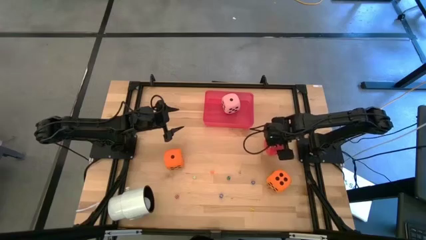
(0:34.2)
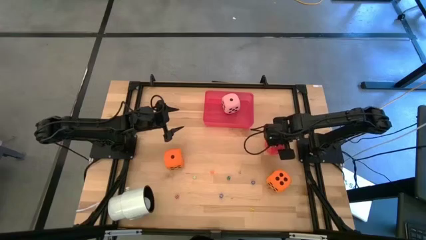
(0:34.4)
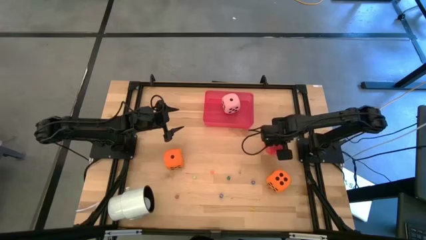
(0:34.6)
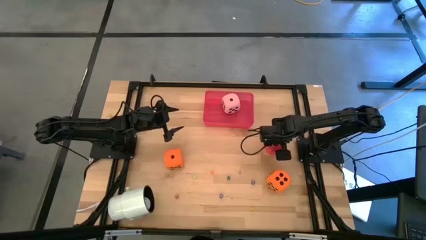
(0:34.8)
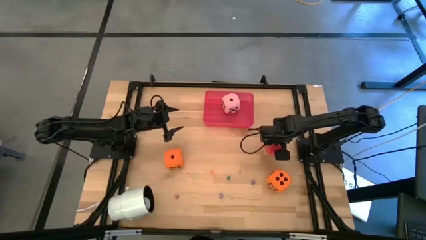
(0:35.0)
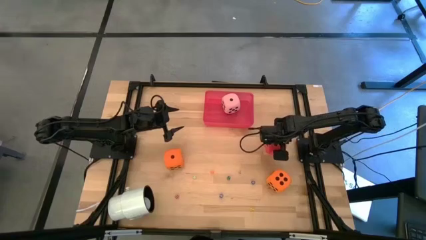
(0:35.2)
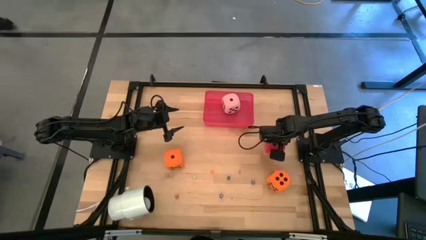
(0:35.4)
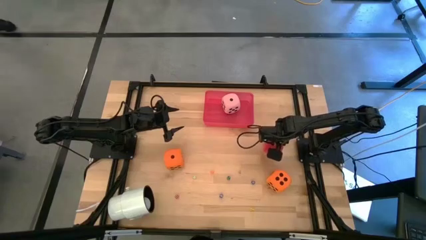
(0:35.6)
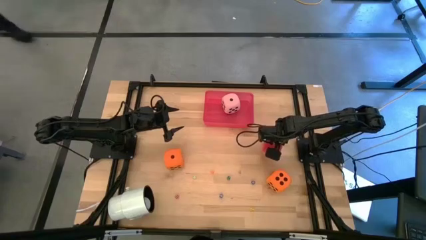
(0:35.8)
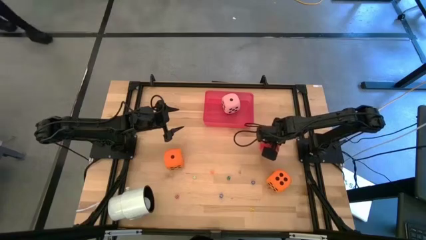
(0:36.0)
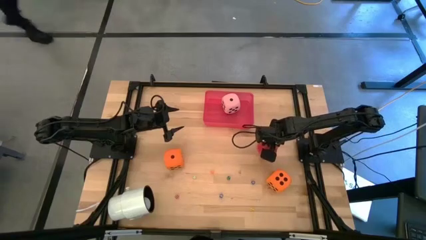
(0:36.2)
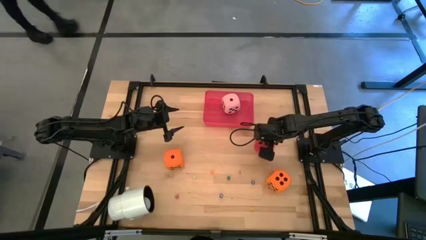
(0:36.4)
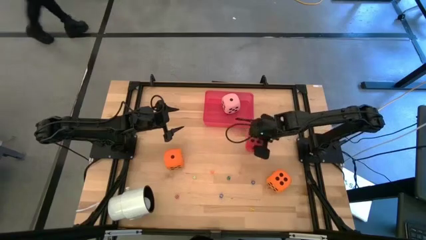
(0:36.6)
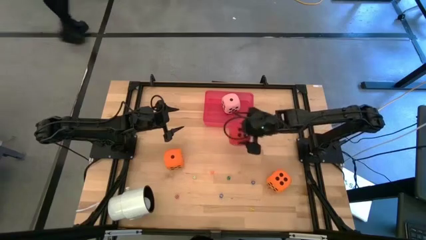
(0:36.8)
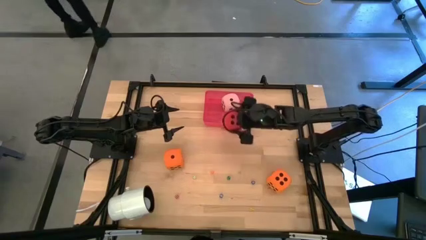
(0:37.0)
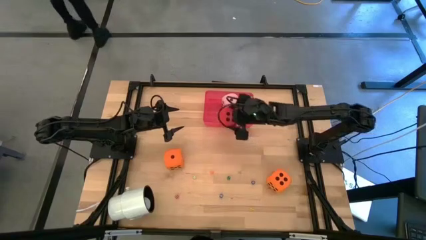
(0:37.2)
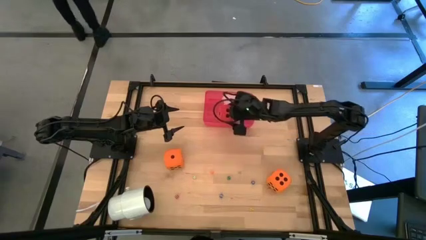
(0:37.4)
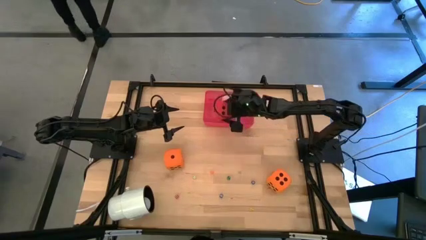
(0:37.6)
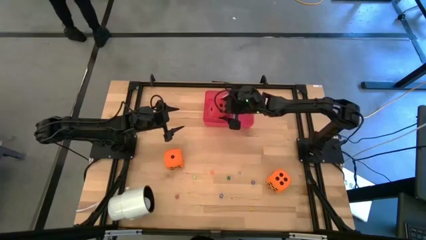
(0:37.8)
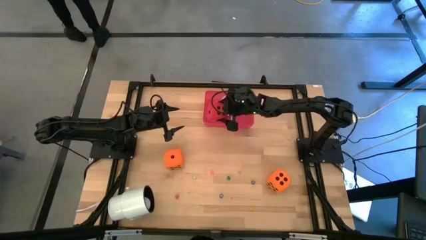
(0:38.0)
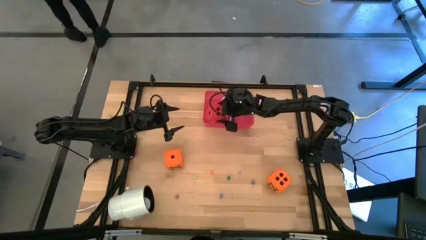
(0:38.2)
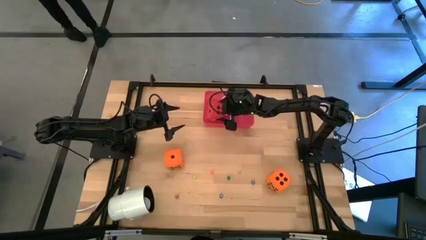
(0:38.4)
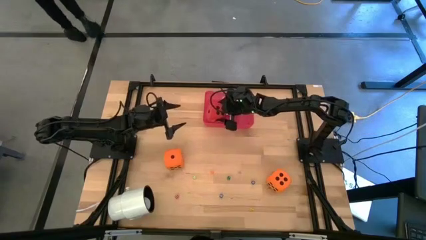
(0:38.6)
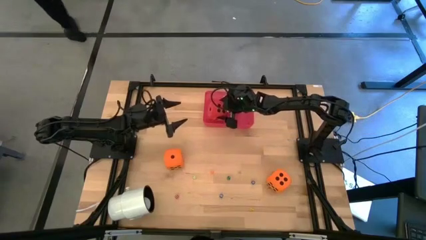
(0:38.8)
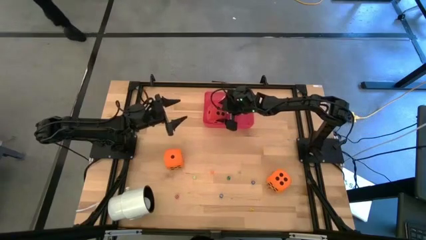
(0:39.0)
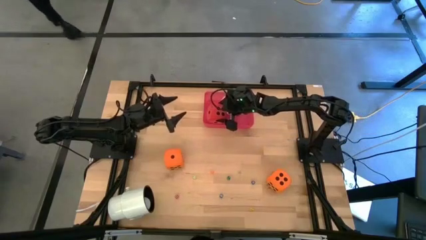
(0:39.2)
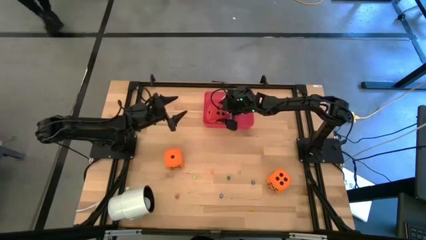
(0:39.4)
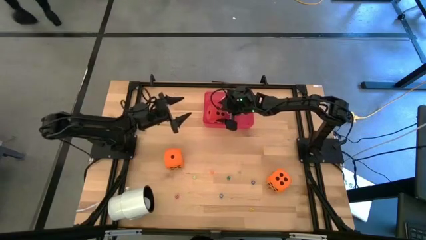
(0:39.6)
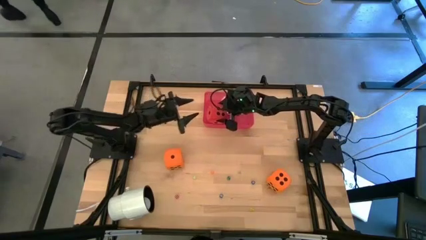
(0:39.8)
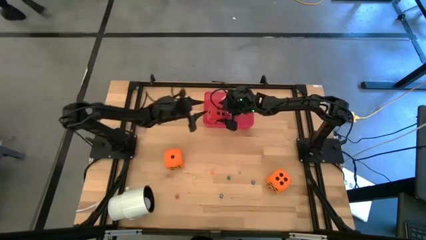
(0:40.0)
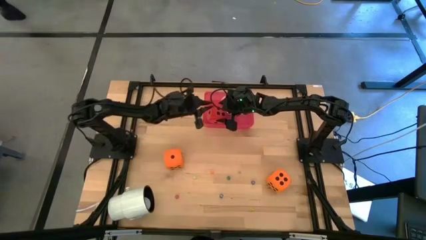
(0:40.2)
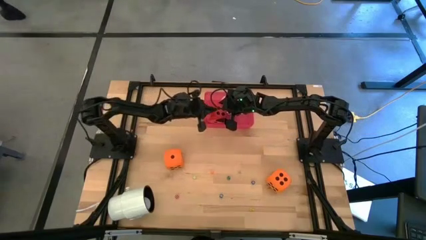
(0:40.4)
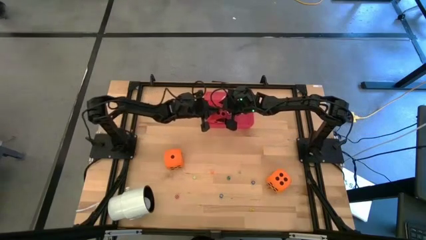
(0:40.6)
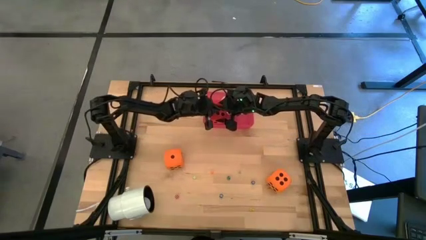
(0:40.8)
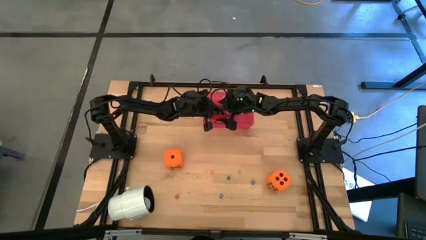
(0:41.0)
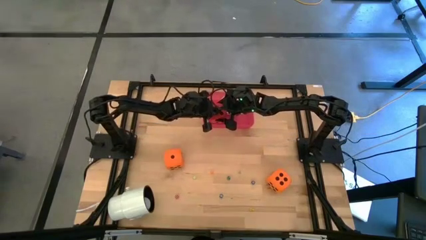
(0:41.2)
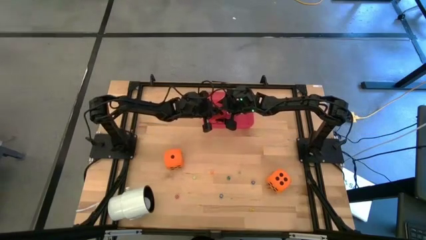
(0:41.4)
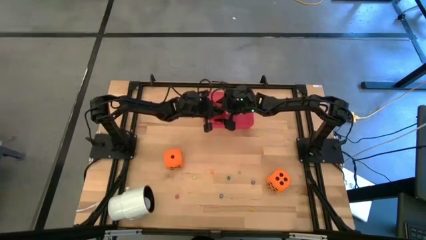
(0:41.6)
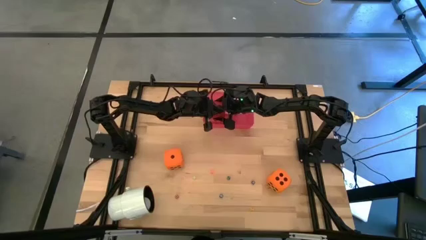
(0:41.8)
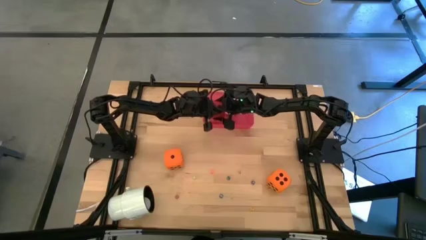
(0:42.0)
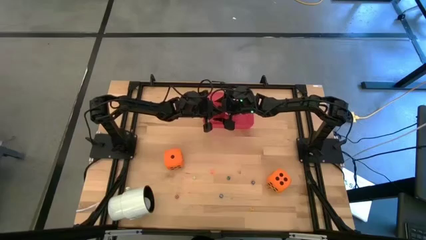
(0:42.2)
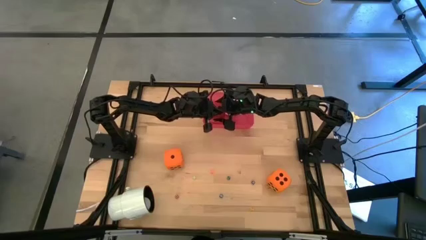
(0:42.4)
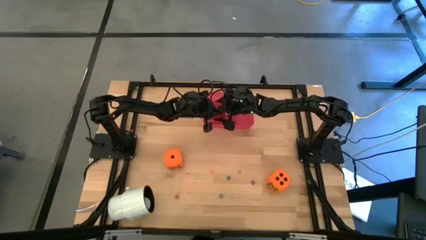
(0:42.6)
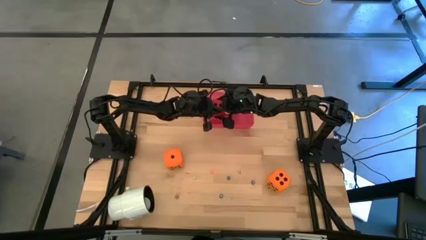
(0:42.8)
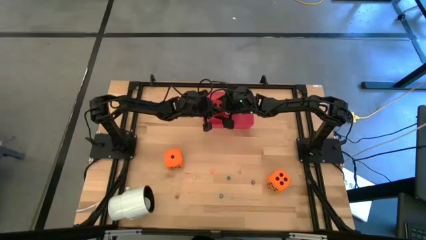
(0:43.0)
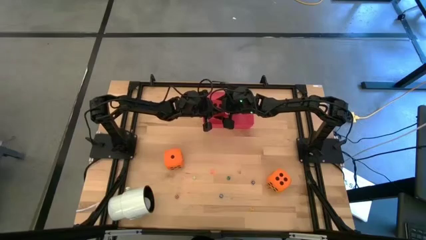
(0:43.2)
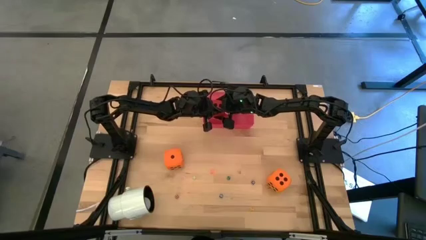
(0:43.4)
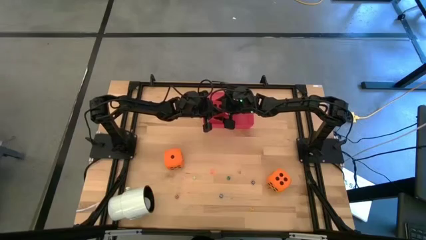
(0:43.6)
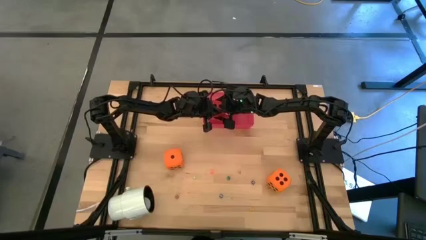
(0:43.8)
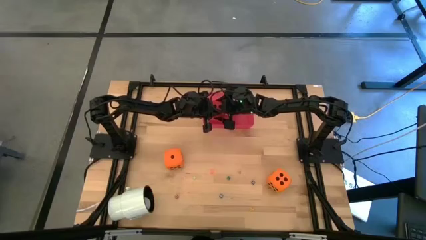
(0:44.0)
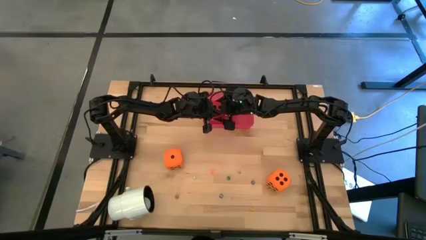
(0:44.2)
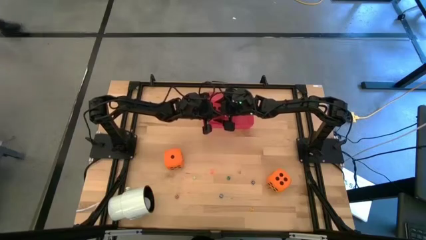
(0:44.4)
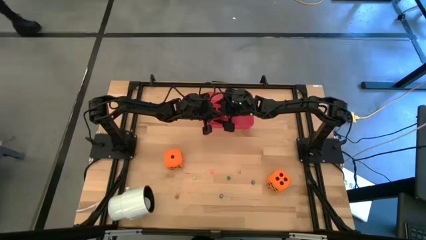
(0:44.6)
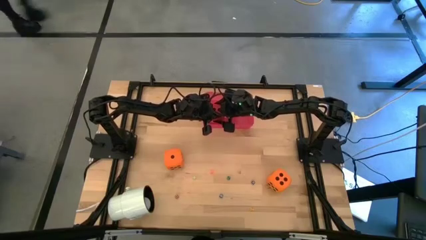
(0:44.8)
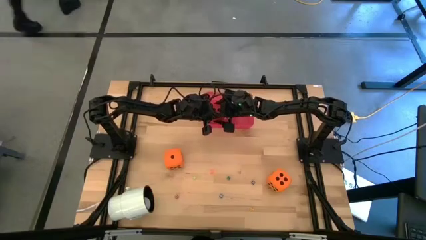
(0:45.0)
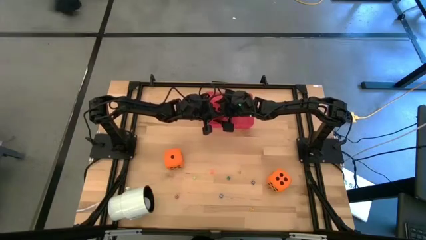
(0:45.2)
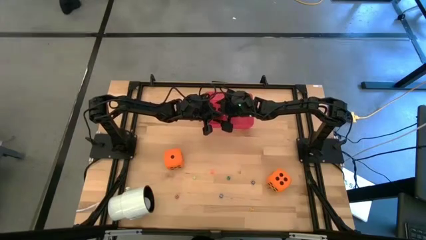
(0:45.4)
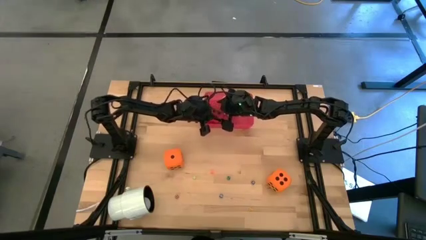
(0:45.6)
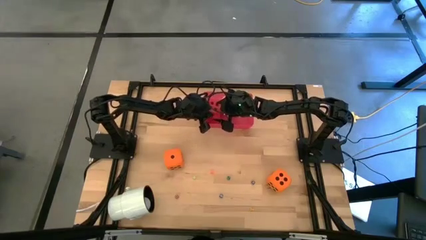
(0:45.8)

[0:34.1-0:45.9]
Task: Pick & Place Dice
Put the large red dice into the red container
